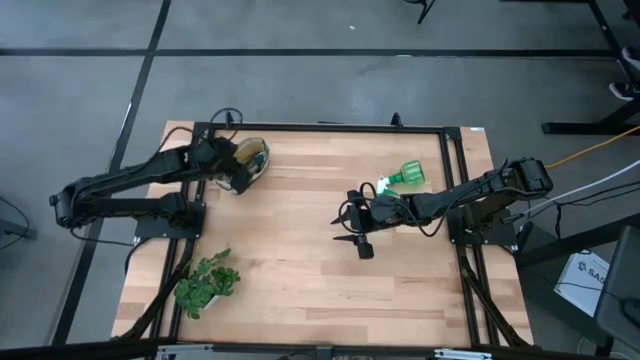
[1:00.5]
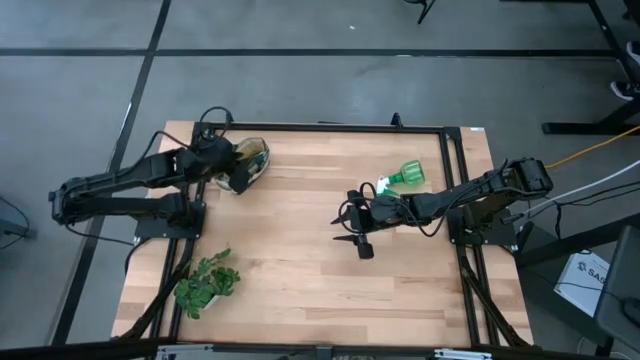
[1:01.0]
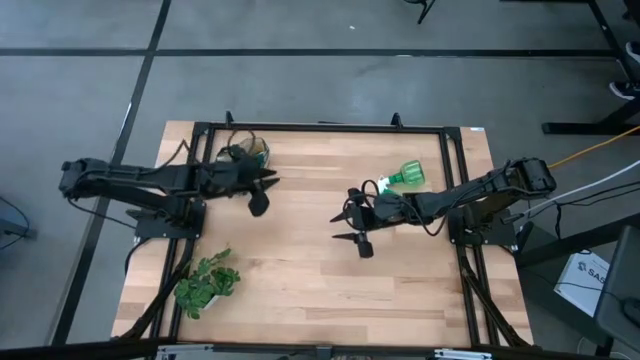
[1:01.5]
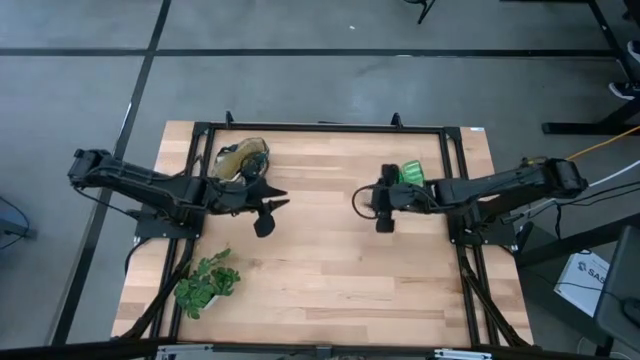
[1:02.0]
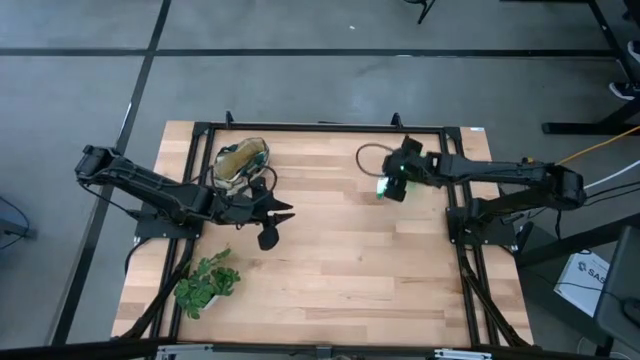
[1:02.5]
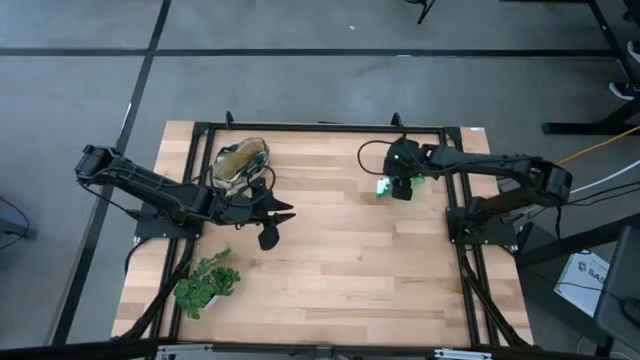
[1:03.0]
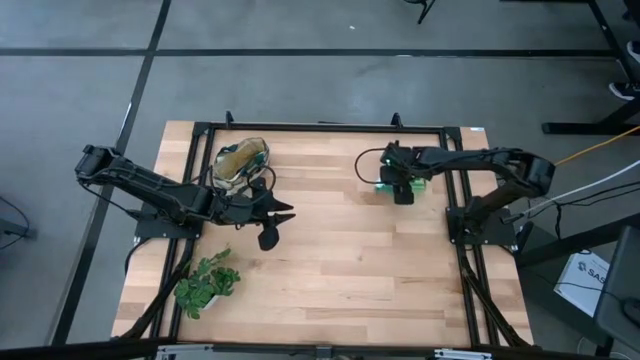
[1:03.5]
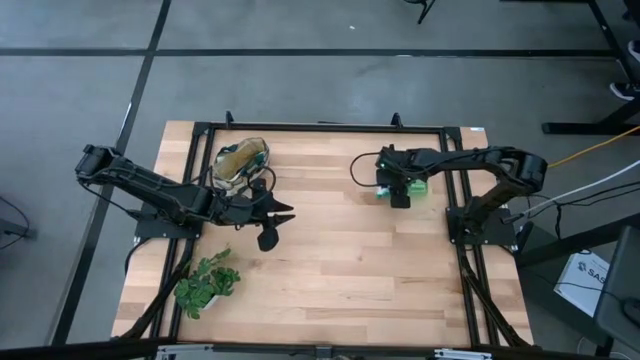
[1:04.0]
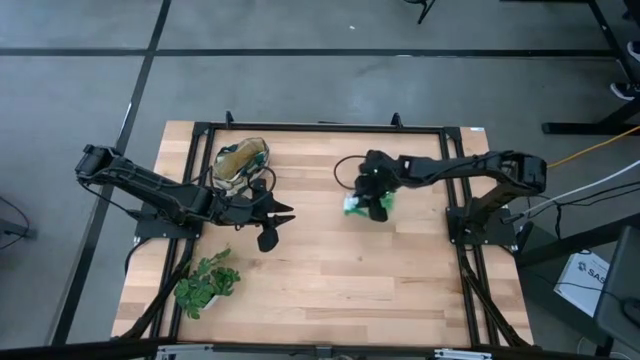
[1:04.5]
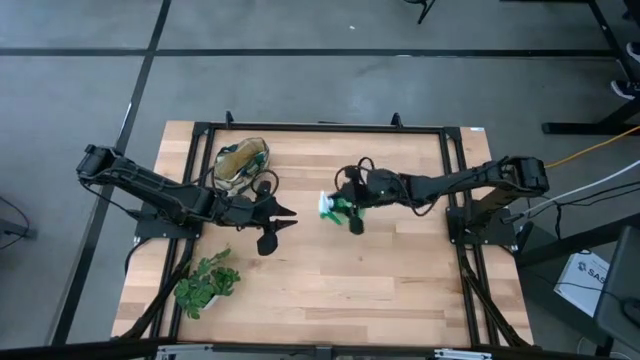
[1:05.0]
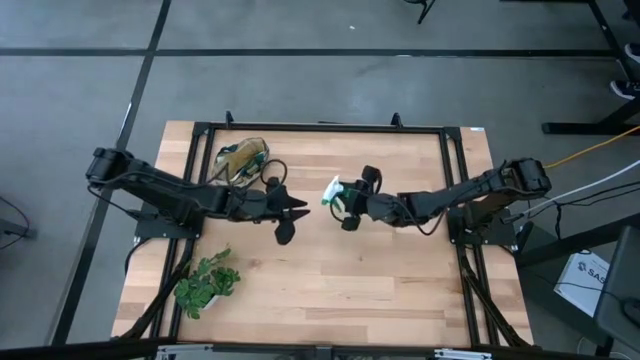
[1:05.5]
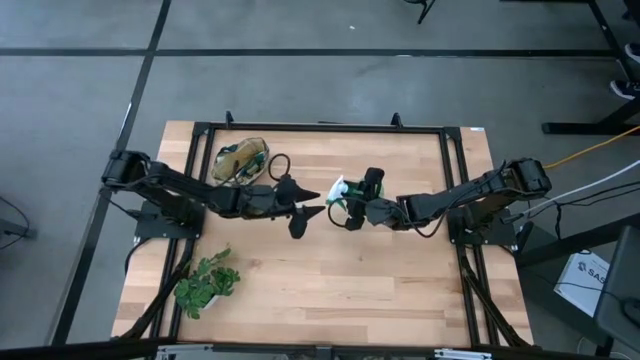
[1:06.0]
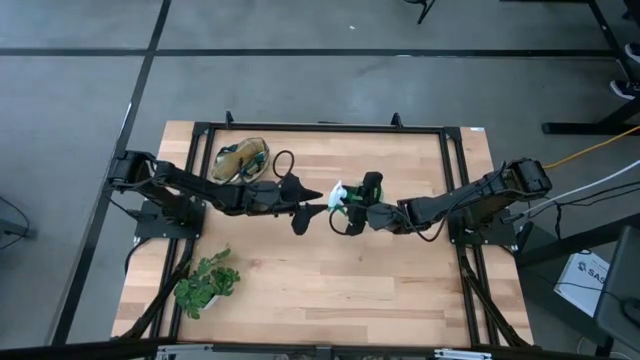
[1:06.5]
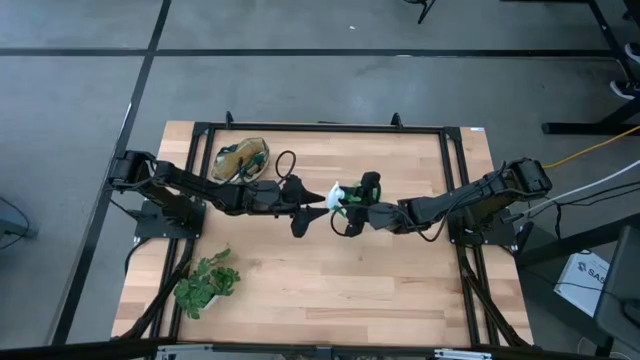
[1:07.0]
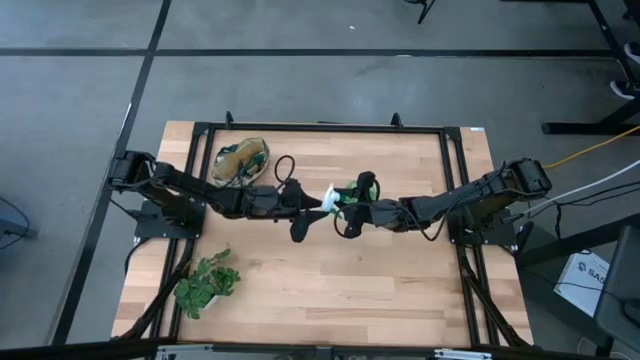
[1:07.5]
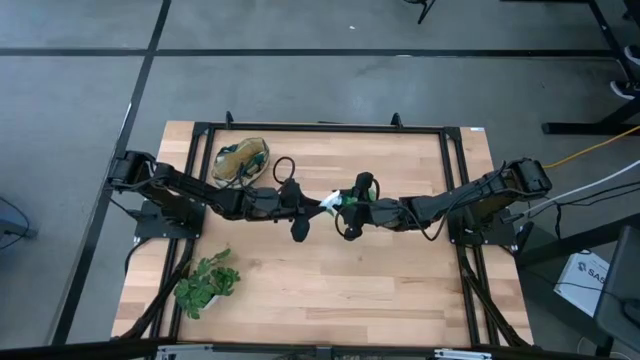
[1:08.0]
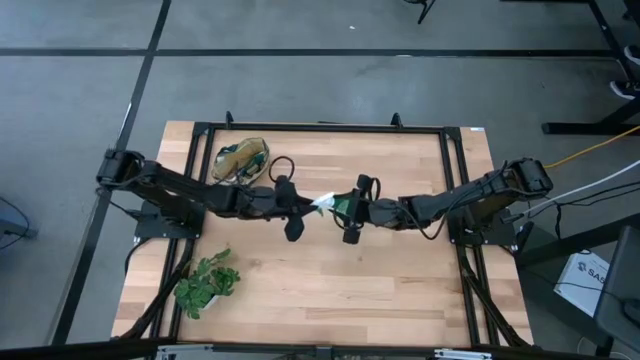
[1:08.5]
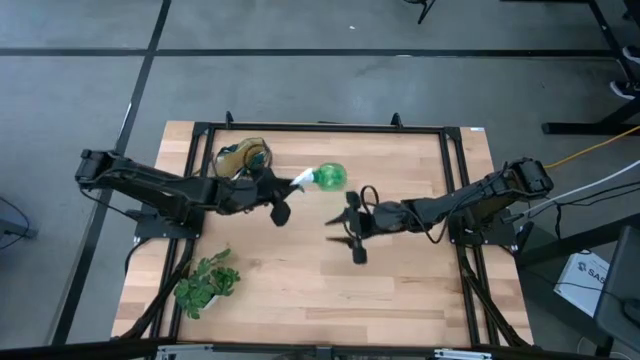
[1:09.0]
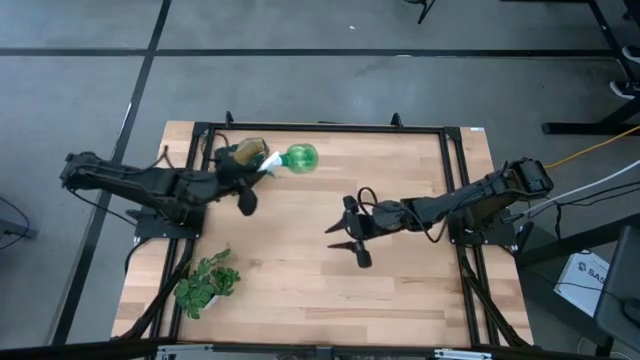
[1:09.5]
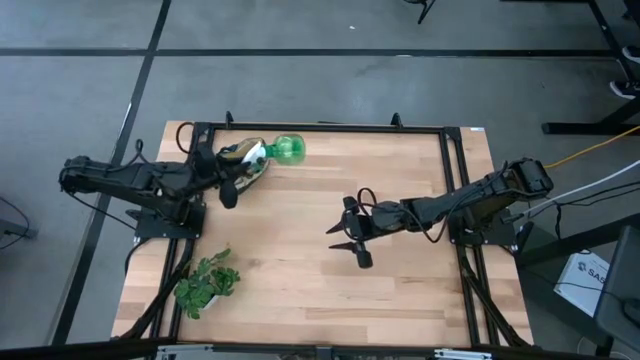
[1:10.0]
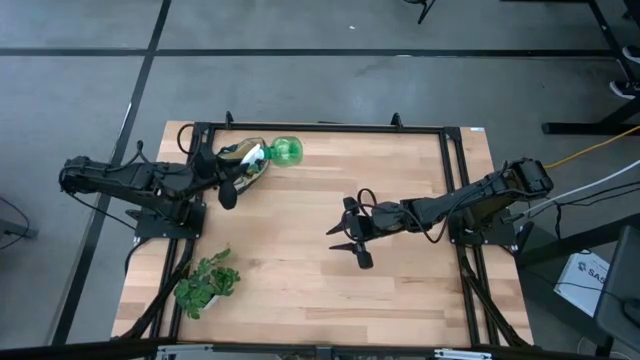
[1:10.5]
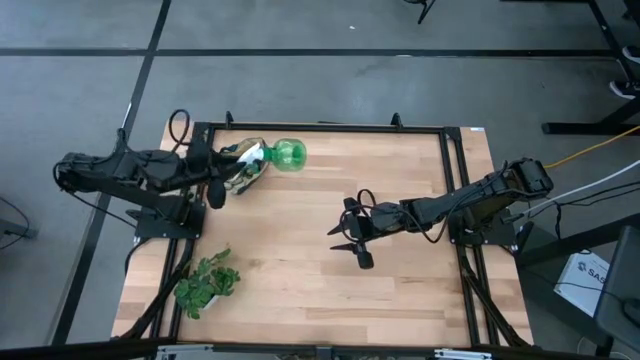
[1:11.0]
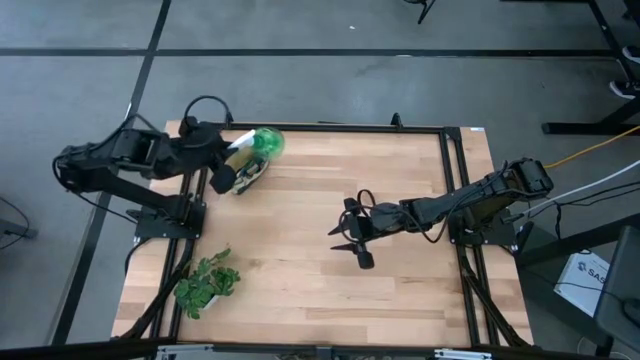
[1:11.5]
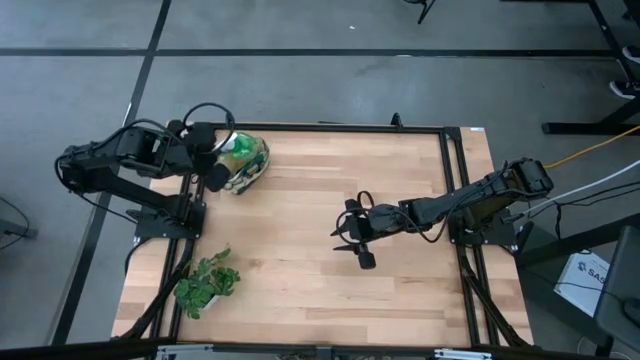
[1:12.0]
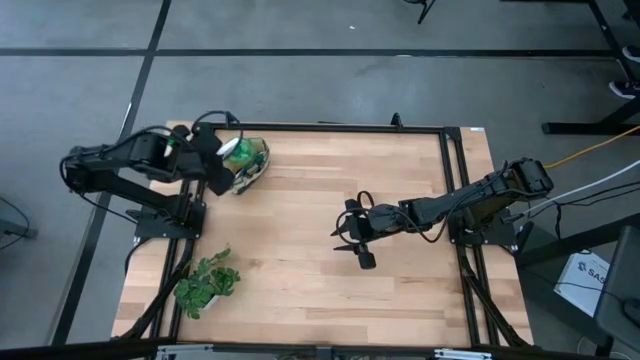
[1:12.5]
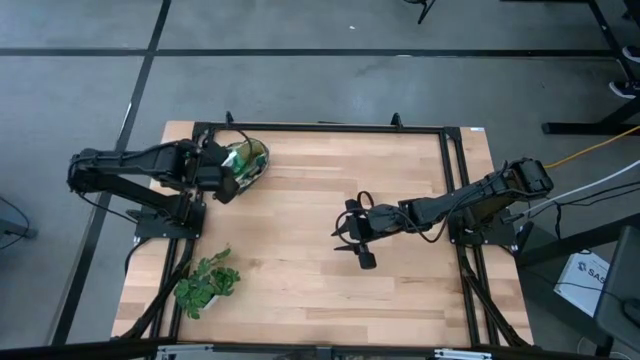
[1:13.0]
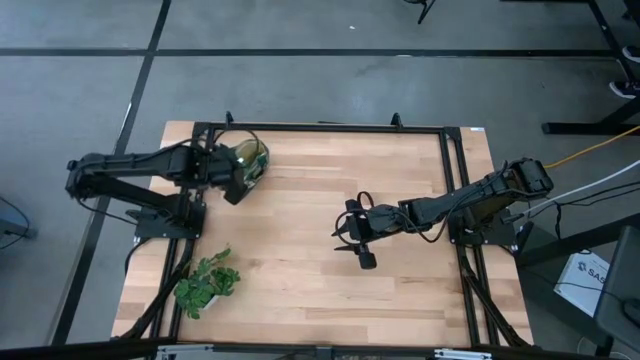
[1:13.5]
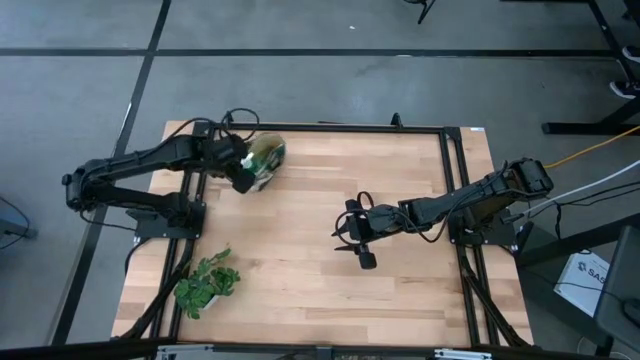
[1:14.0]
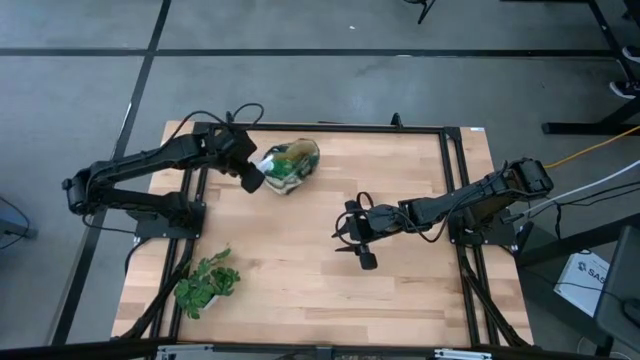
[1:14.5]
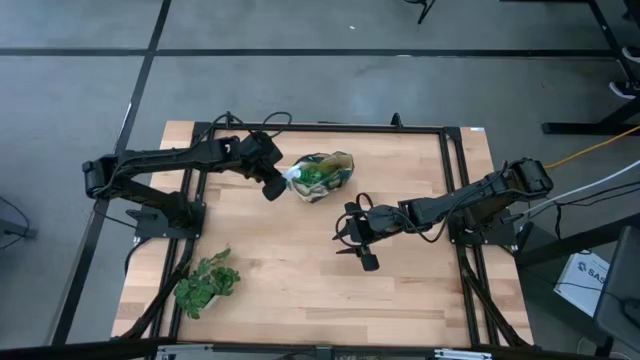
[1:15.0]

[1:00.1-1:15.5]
Task: Pick & Place Garden tools in Gardening bag
Put the spray bottle into the gardening bag

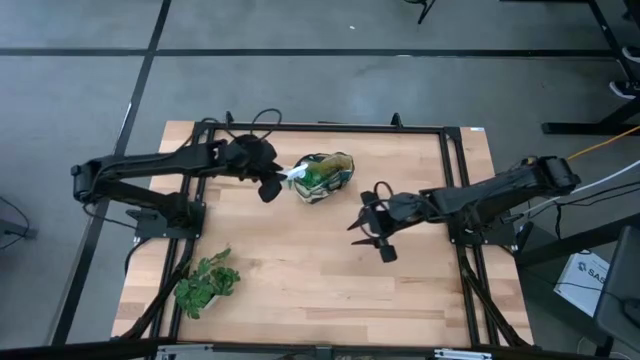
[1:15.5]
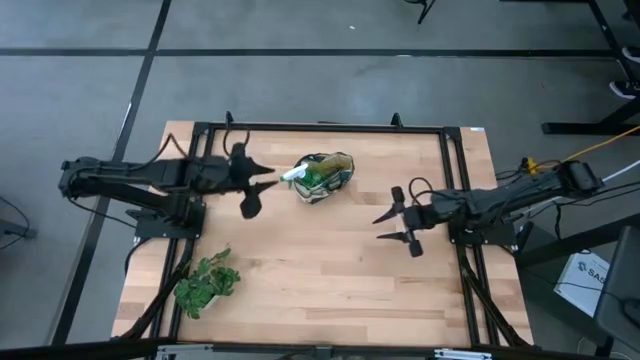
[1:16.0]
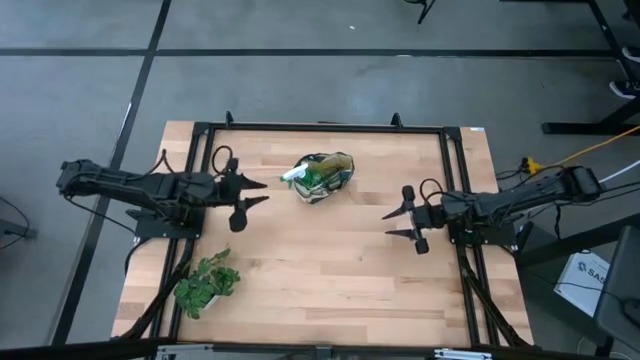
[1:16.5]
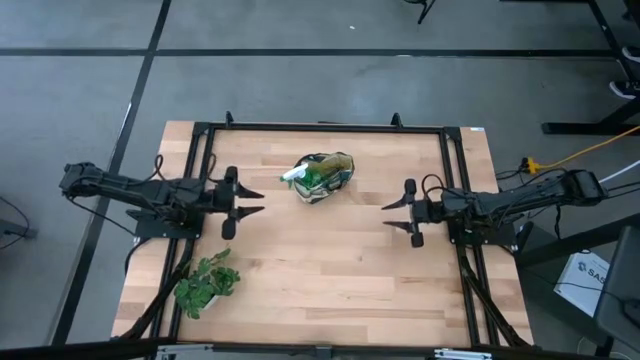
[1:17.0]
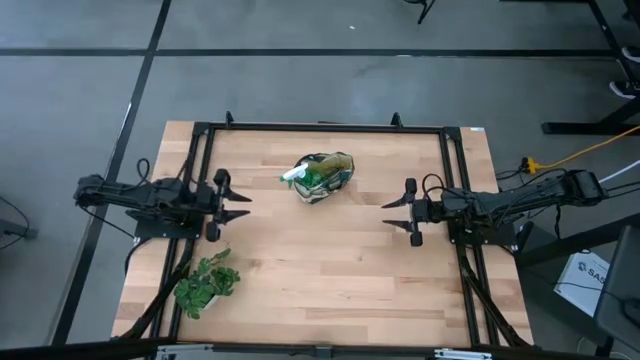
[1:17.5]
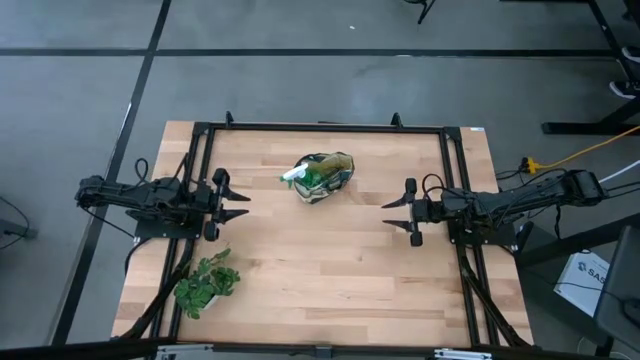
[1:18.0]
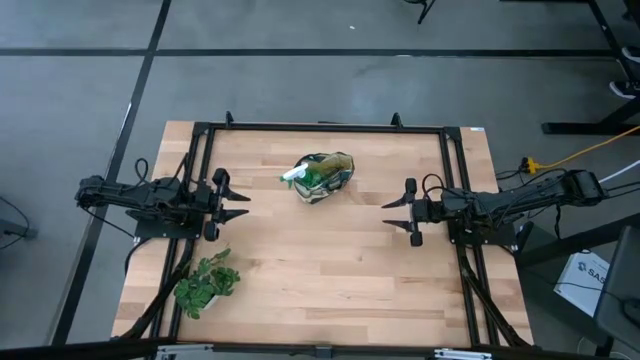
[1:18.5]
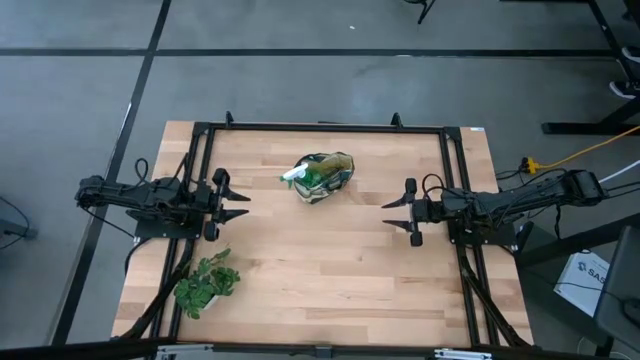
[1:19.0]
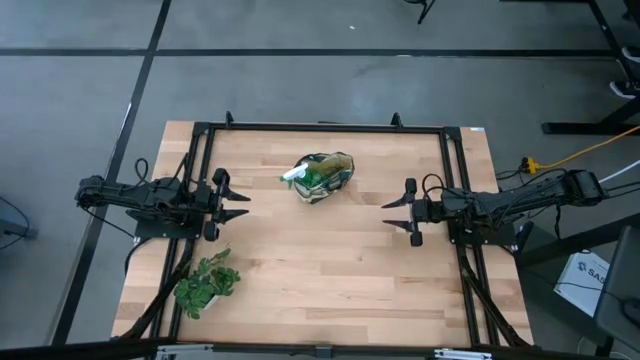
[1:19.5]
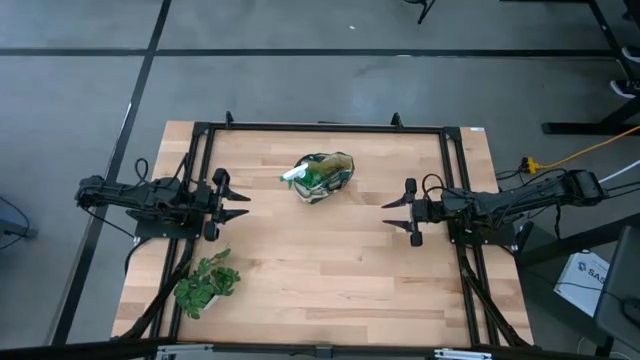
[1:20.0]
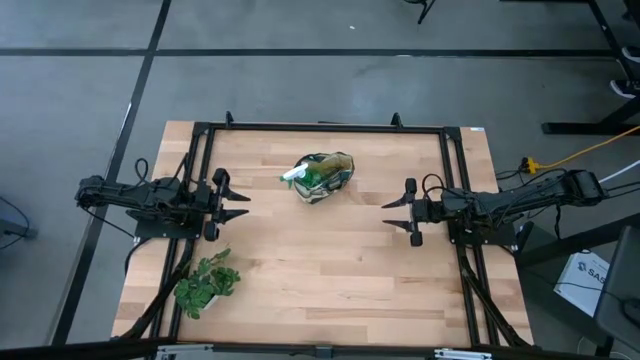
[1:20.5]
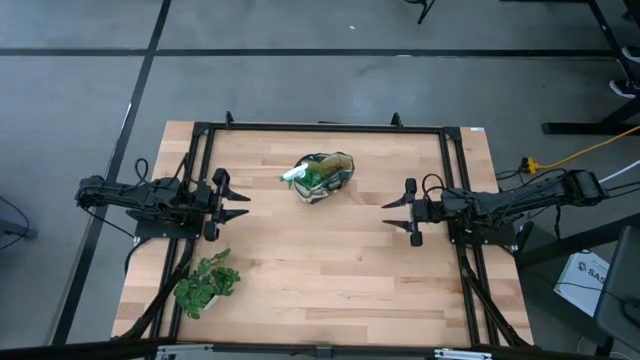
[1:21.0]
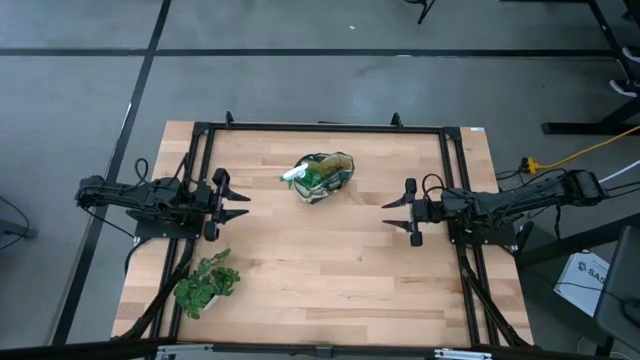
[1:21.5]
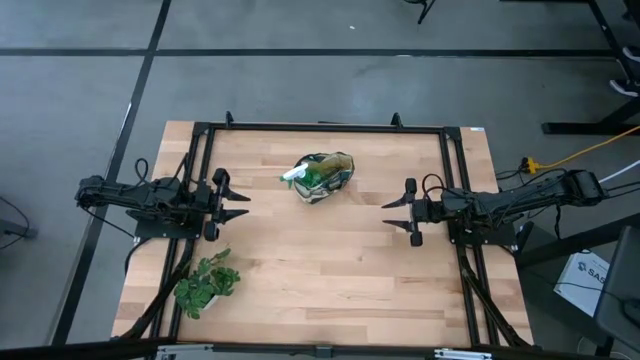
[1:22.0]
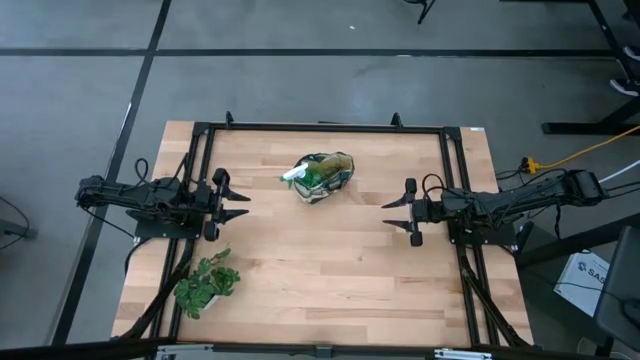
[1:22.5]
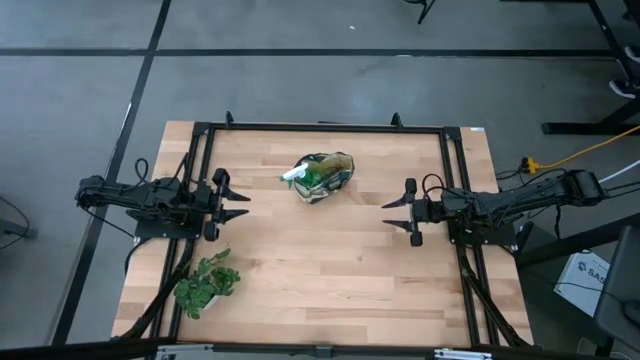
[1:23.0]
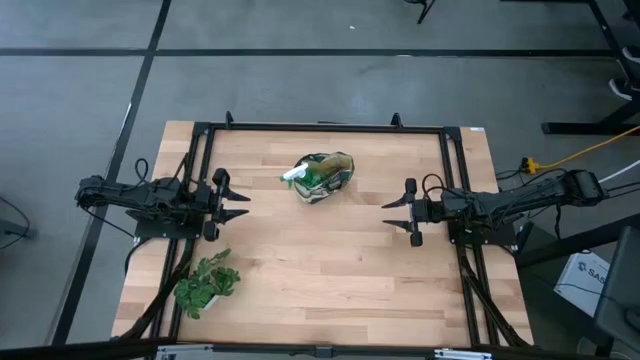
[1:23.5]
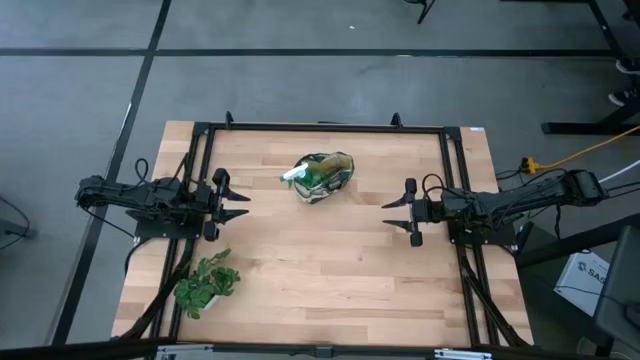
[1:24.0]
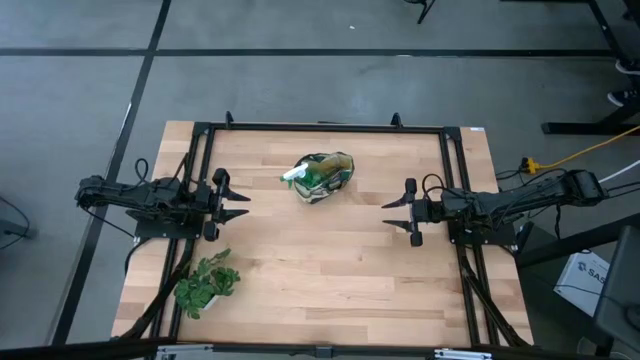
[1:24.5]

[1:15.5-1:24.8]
Return to Home Position
